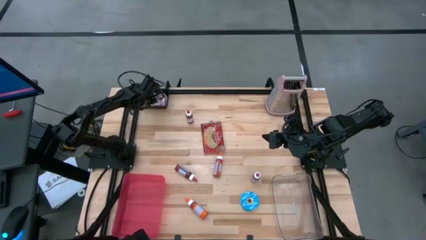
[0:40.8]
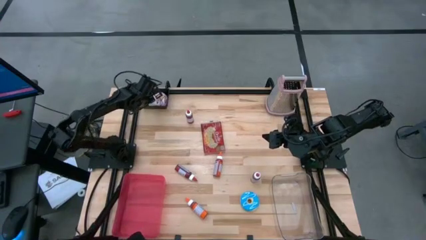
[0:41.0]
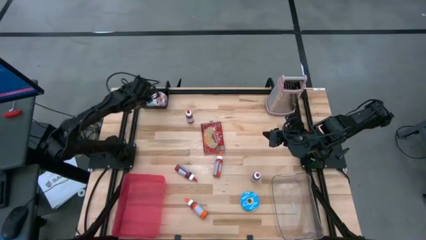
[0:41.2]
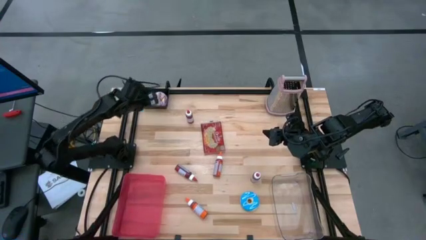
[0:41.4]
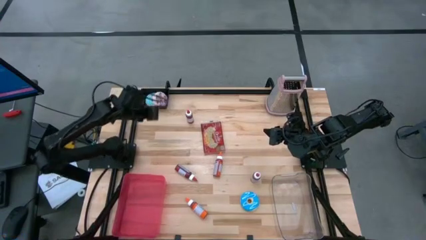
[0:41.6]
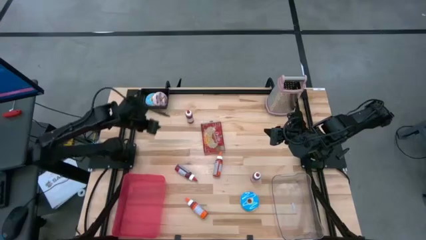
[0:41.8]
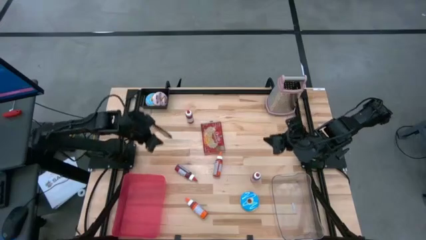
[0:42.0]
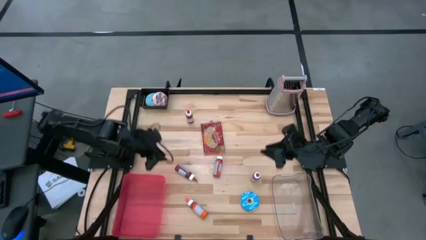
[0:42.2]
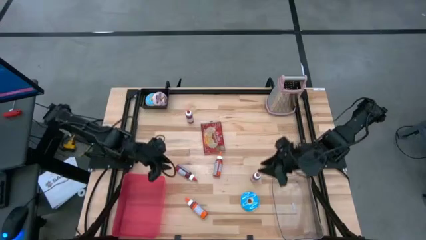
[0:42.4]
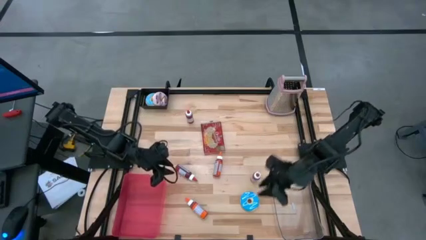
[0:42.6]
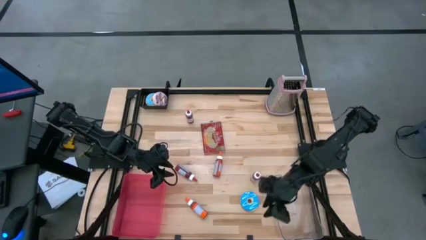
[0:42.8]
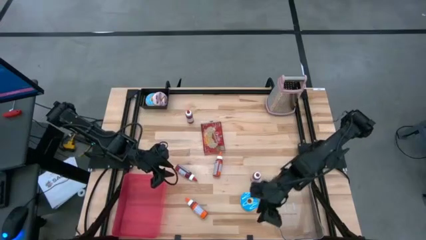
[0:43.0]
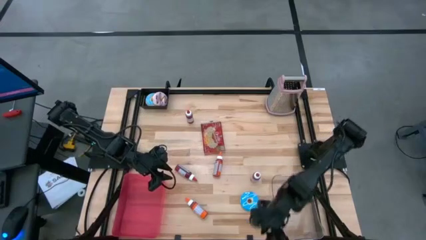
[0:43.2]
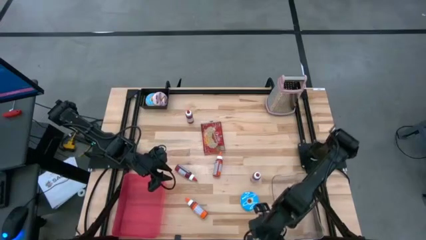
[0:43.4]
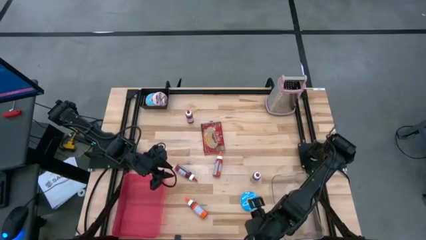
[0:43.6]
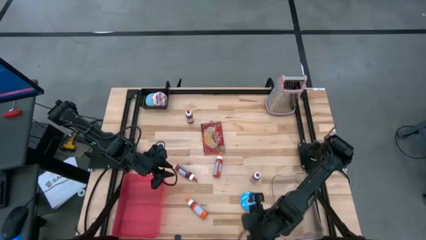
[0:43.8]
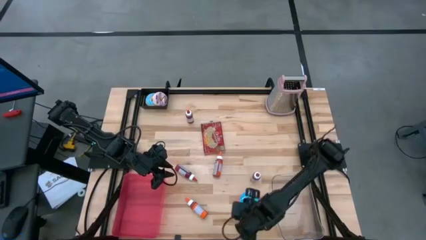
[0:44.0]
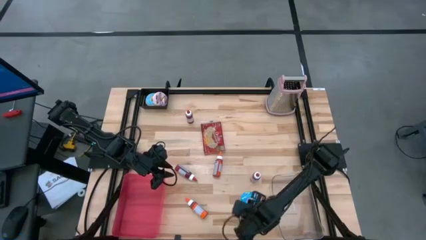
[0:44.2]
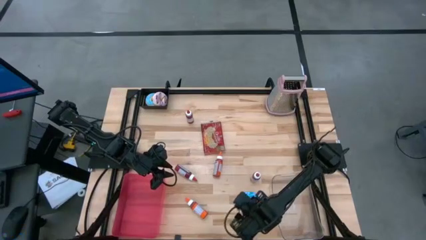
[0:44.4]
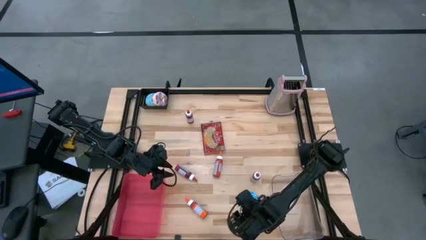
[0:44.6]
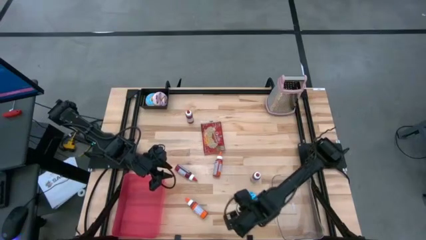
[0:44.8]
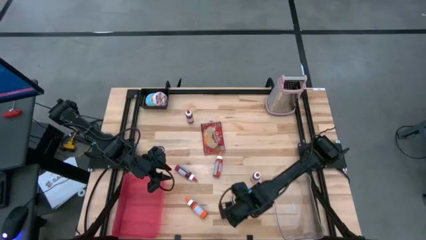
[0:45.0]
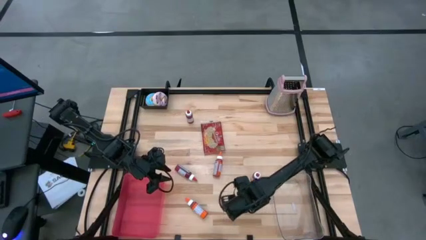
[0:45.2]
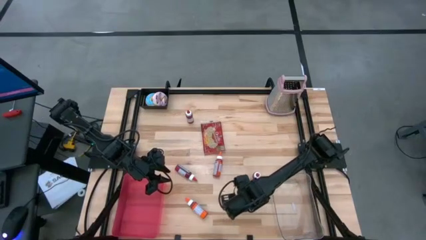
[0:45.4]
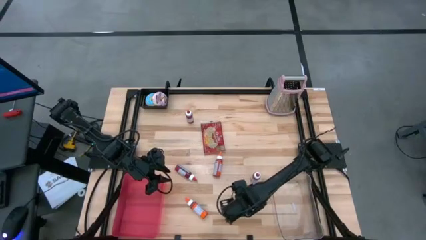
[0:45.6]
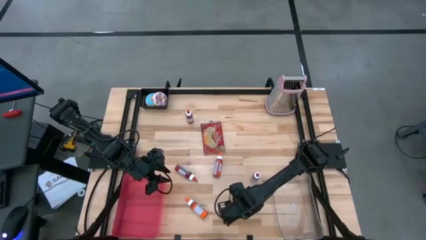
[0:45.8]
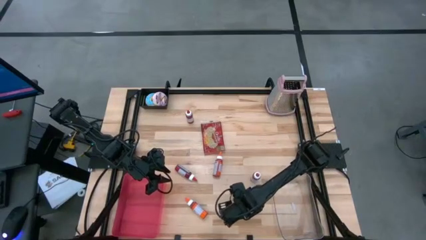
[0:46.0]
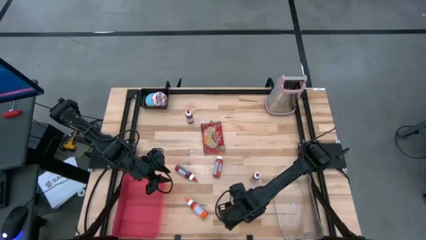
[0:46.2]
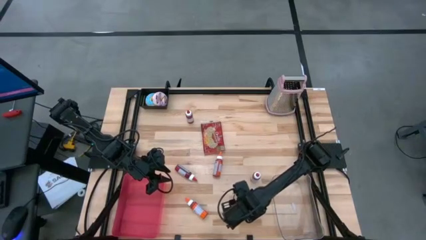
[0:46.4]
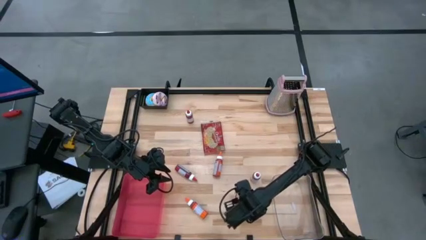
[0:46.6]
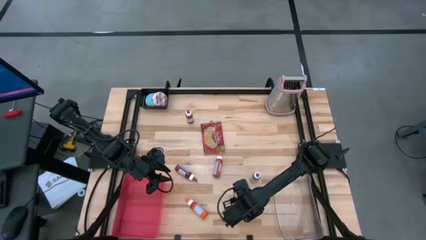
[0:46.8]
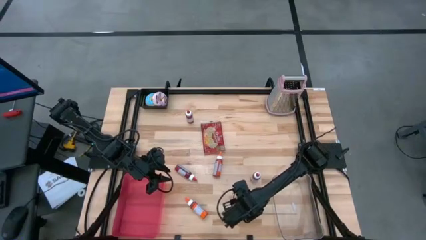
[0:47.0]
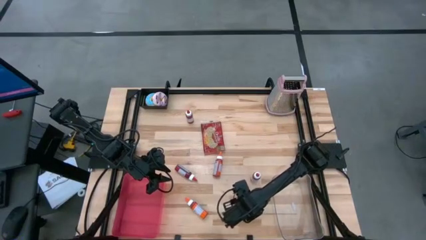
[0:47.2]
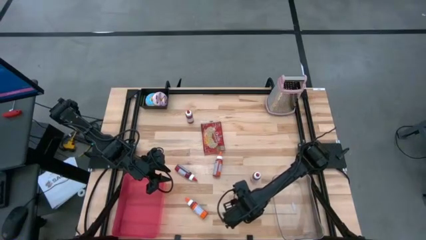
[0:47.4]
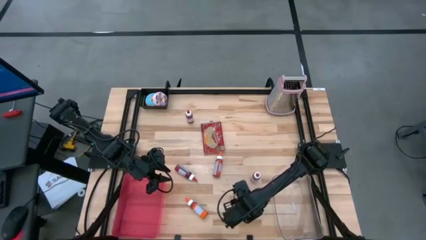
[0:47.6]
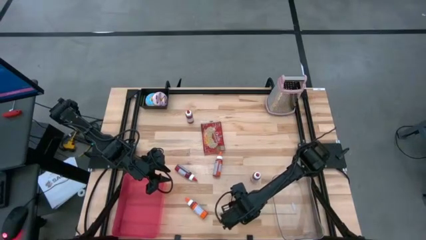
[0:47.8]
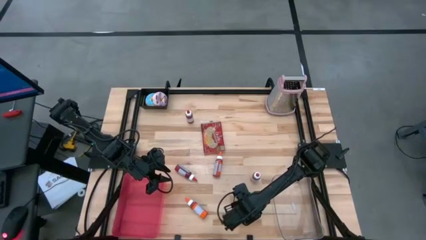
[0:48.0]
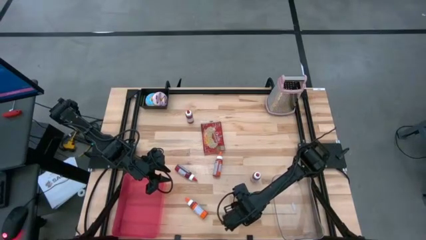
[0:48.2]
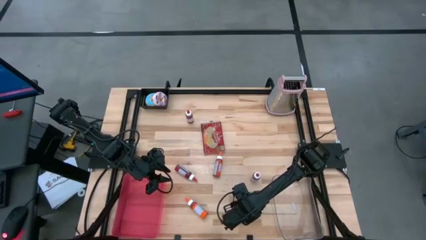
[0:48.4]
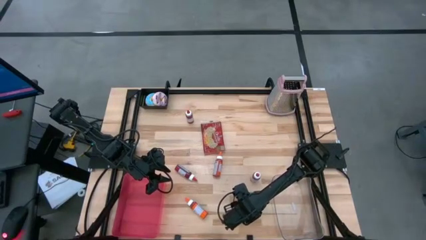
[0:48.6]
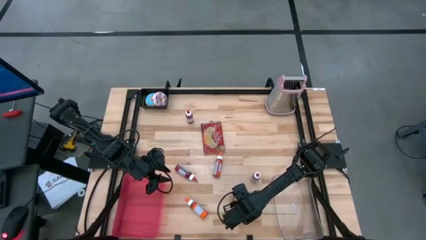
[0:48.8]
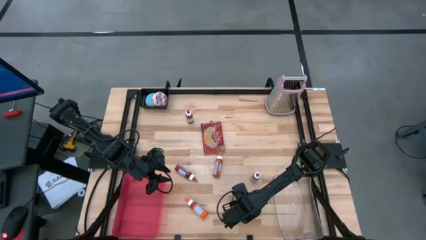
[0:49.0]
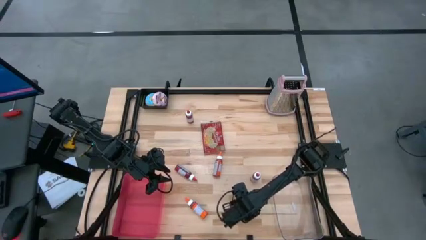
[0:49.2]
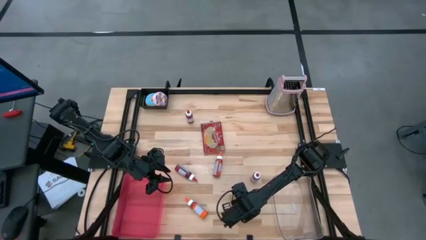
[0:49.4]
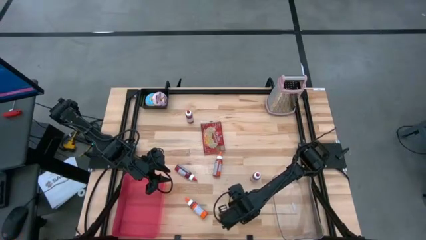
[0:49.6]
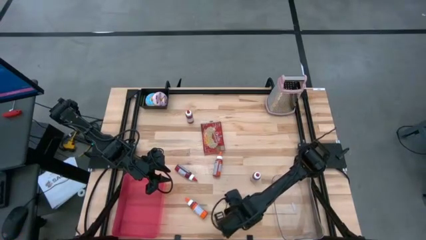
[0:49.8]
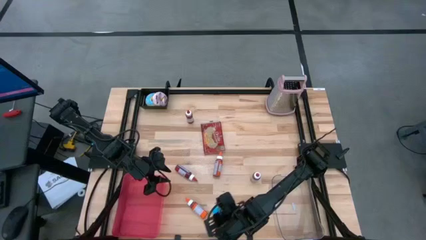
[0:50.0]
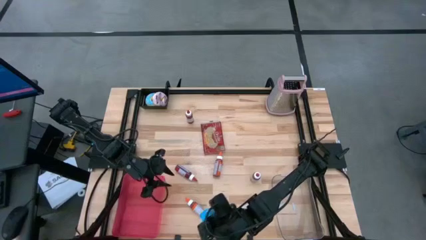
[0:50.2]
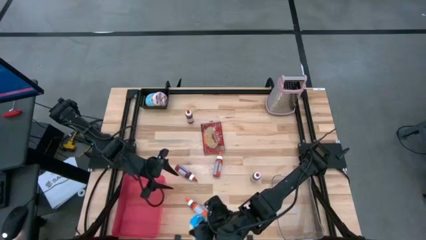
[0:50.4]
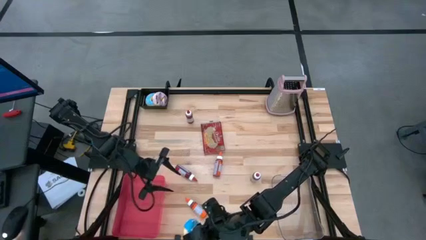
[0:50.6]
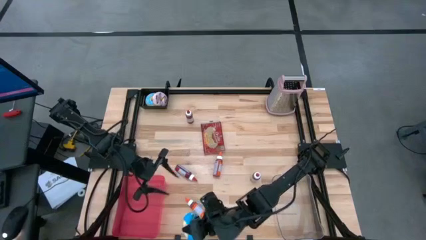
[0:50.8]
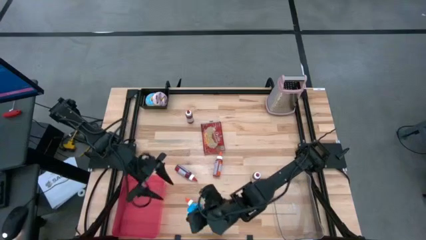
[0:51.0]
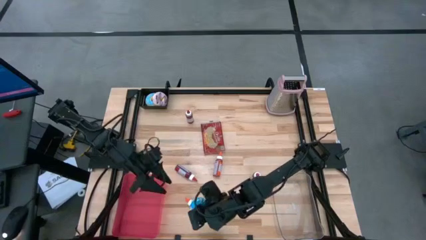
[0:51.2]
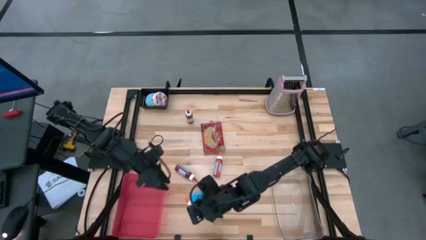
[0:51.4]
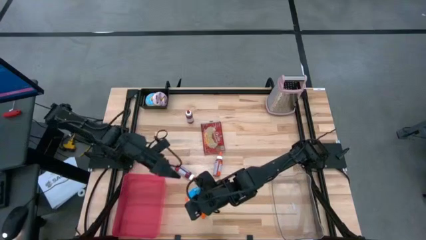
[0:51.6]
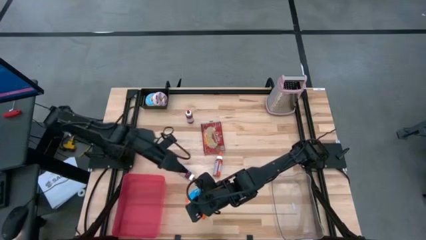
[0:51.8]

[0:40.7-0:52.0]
Put the blue donut into the black bin

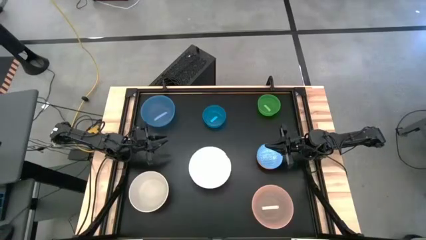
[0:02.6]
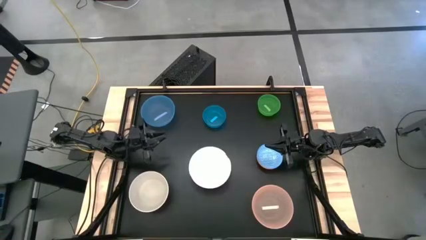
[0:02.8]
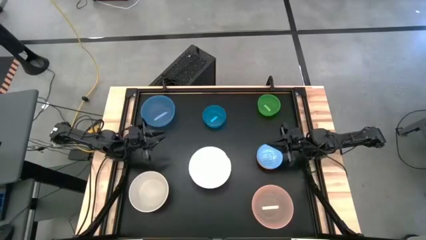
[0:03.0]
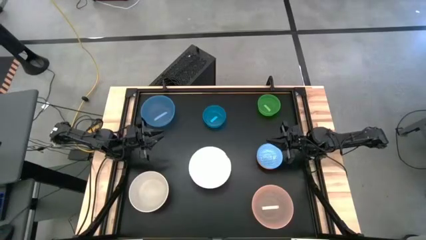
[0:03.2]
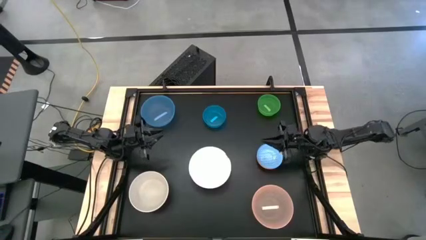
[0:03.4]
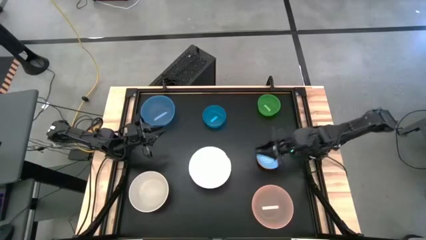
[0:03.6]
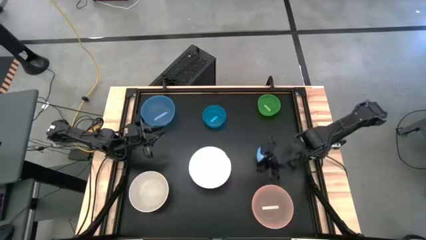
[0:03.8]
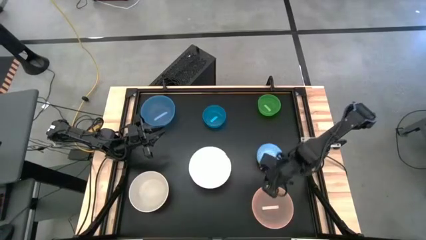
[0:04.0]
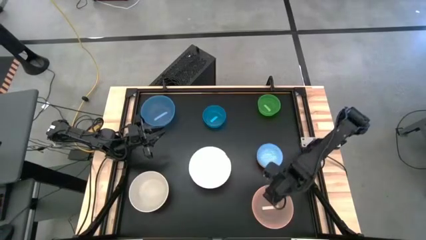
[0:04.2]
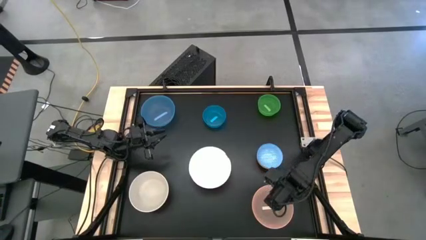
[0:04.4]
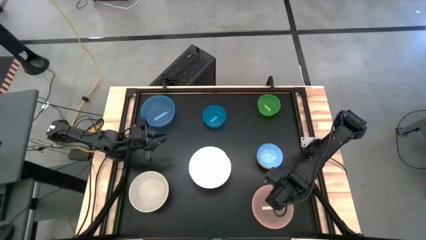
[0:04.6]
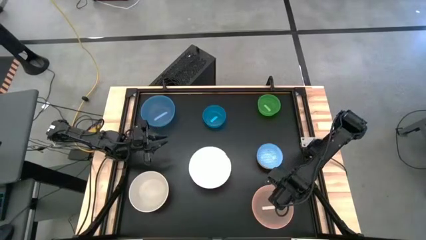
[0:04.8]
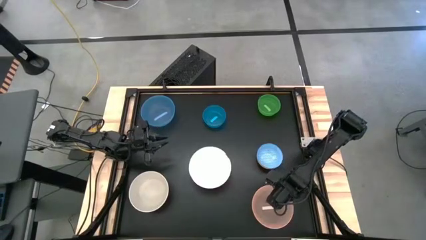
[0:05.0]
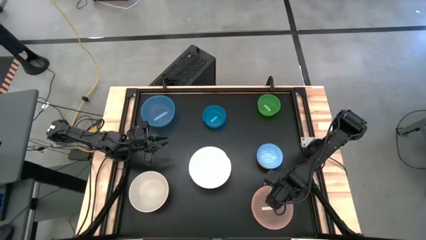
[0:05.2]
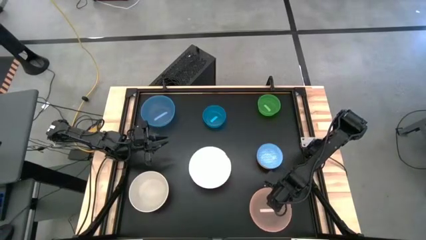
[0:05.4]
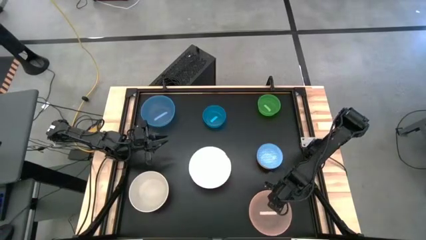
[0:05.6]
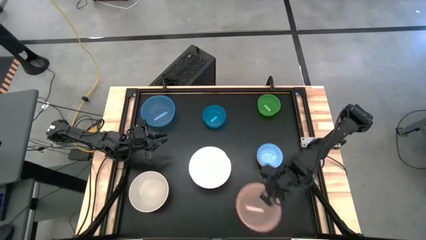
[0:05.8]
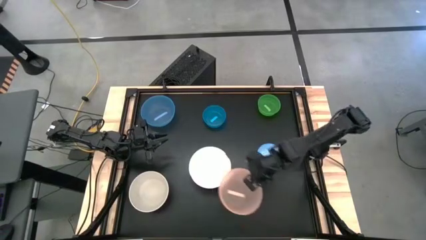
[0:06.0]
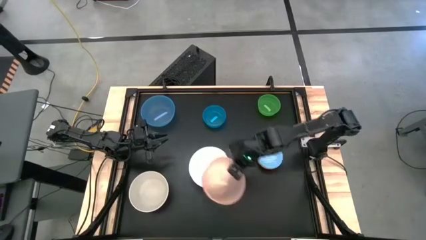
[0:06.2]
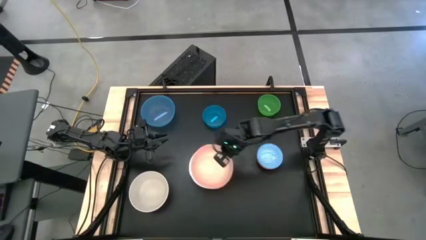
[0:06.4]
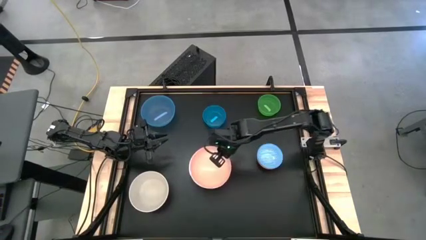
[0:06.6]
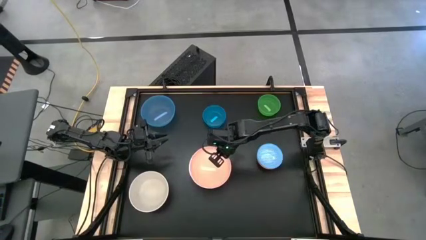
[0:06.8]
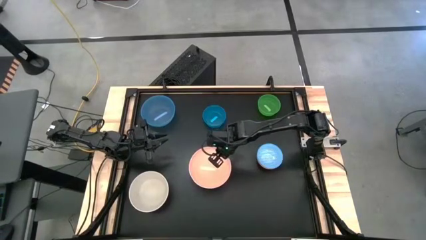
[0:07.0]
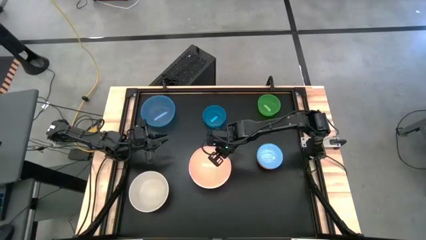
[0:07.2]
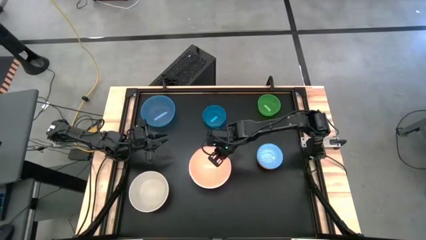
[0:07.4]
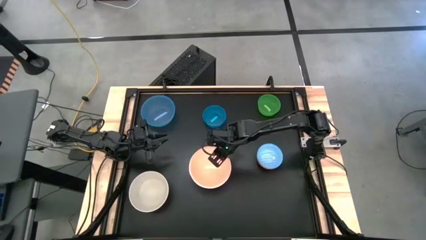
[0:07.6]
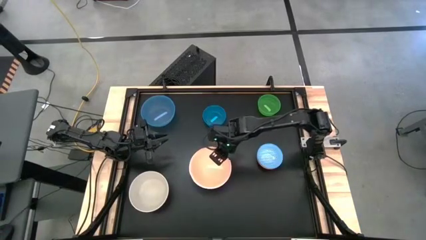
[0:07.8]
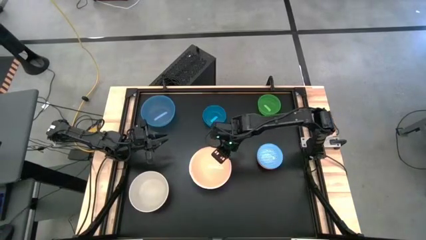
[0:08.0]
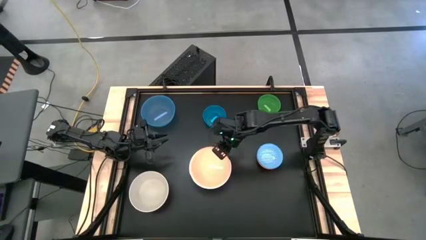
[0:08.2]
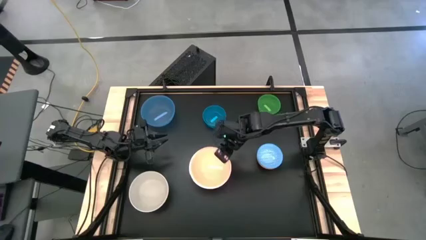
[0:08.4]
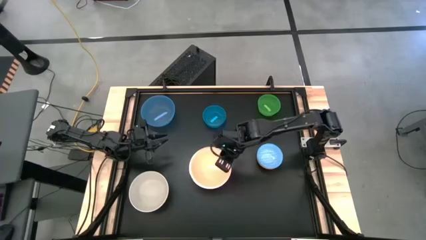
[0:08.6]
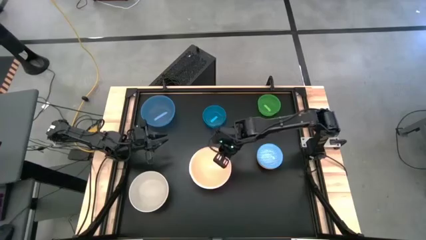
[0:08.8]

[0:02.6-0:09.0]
Stack the light orange bowl into the pink bowl
